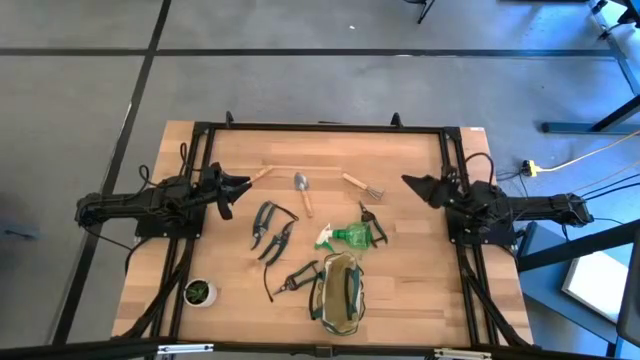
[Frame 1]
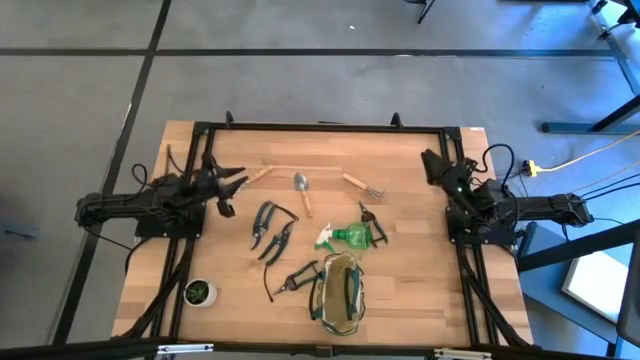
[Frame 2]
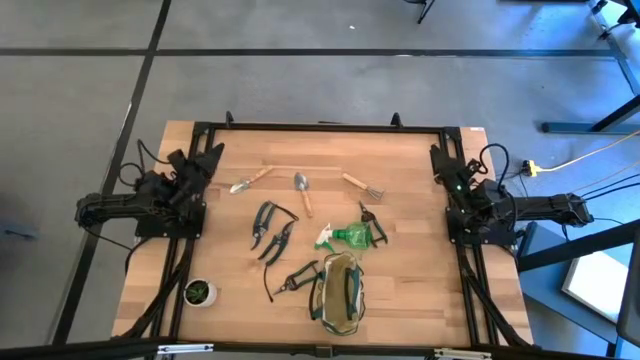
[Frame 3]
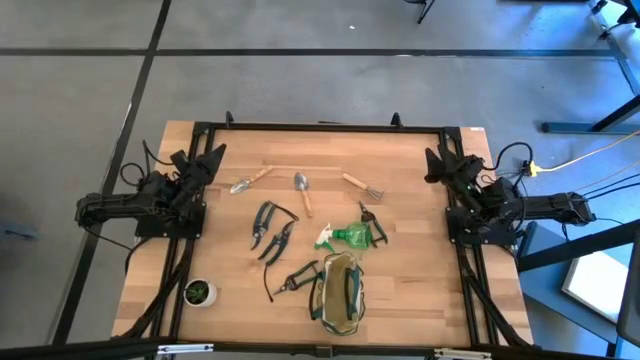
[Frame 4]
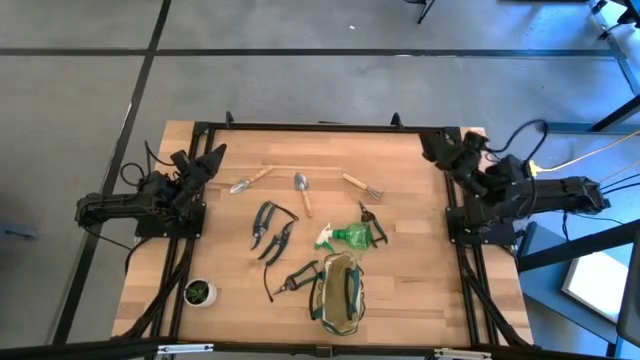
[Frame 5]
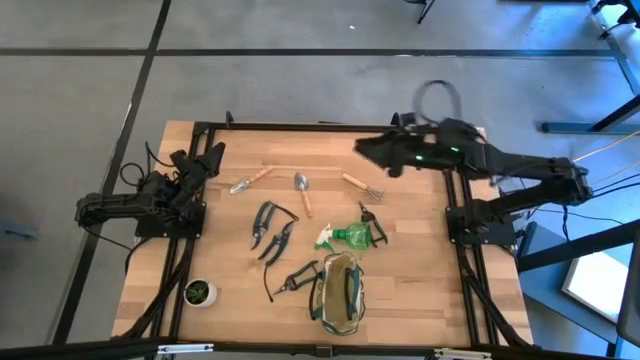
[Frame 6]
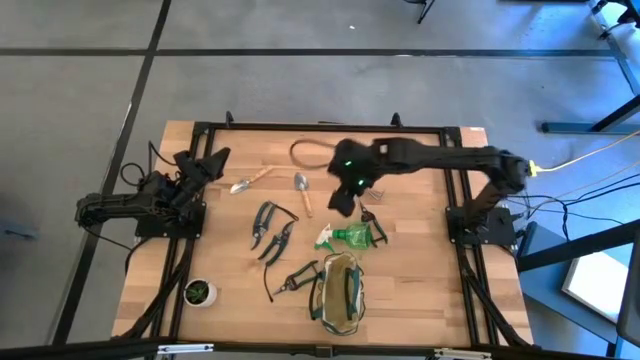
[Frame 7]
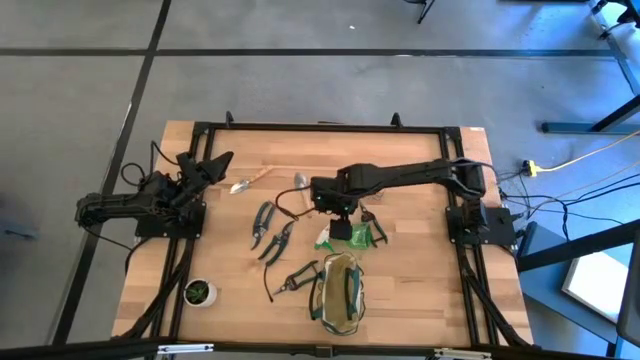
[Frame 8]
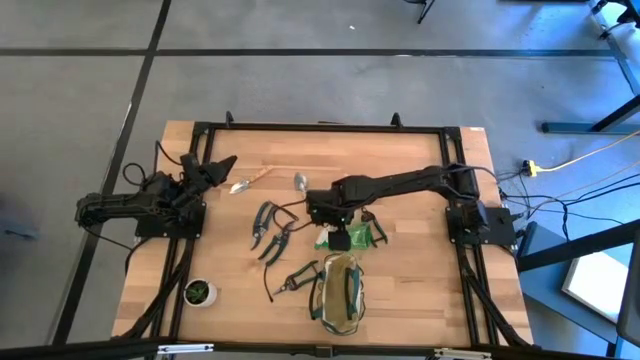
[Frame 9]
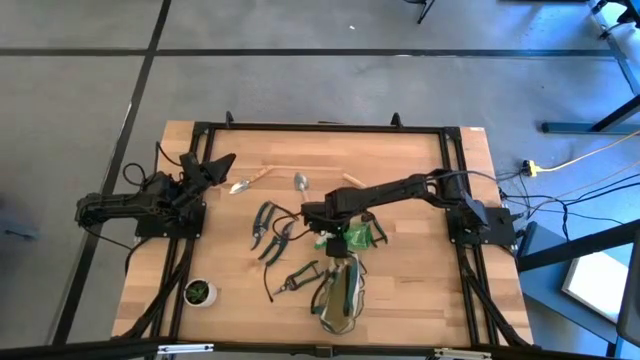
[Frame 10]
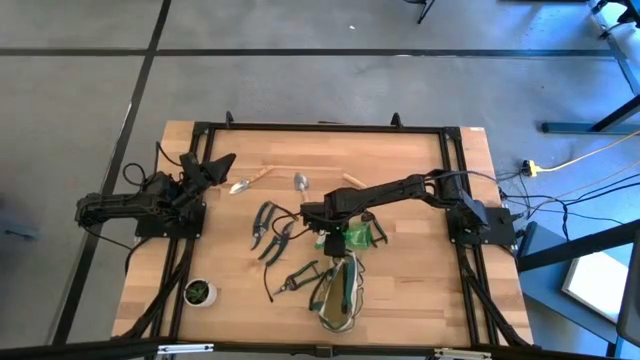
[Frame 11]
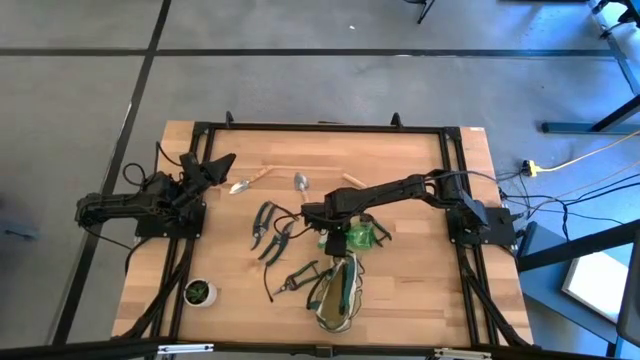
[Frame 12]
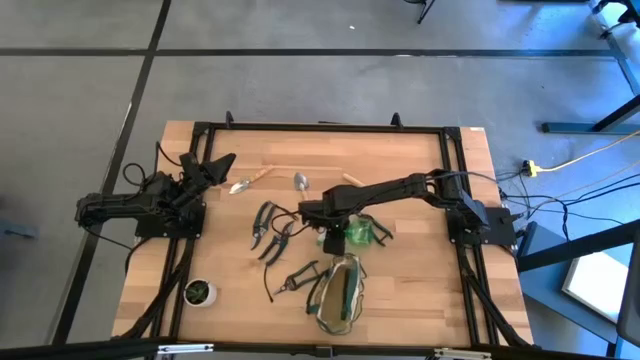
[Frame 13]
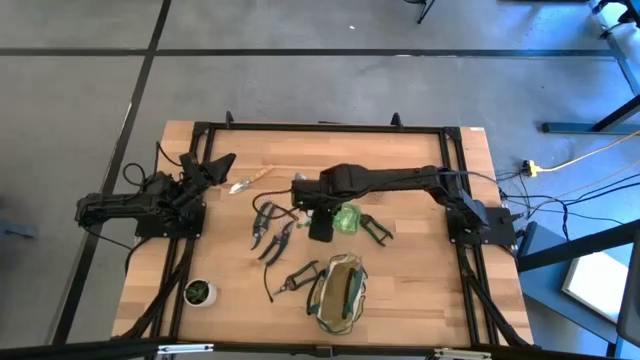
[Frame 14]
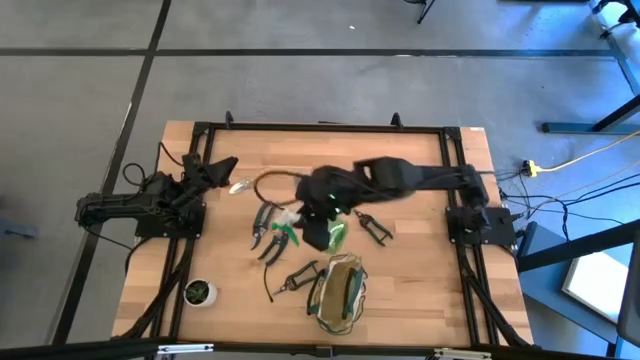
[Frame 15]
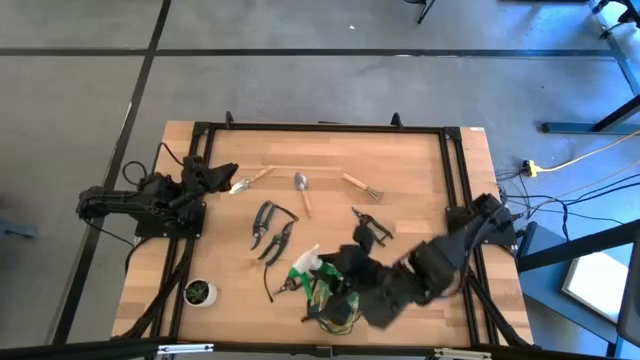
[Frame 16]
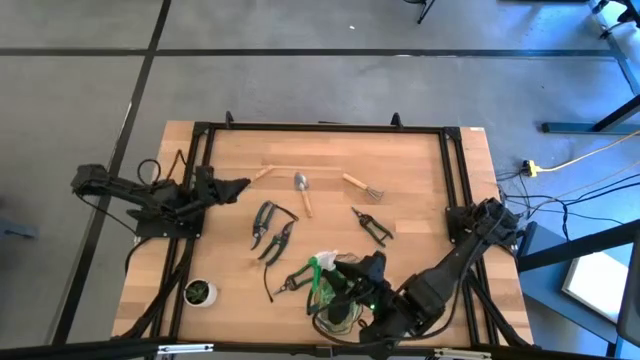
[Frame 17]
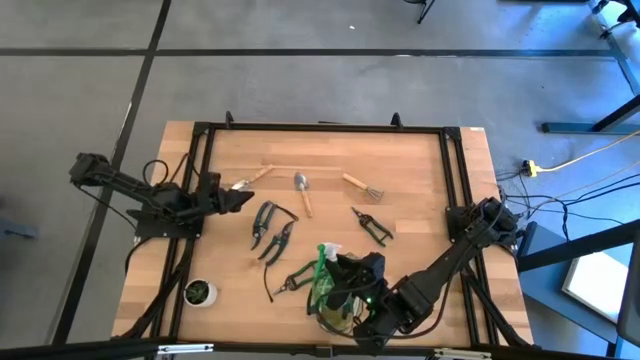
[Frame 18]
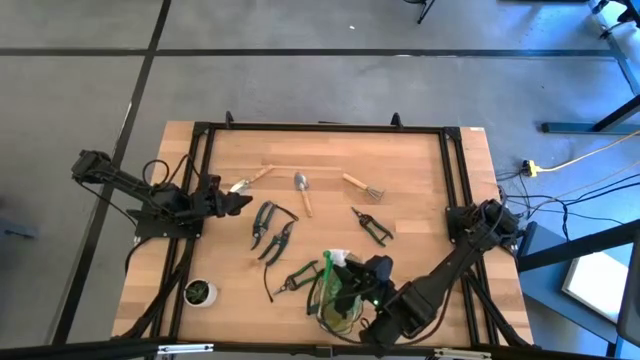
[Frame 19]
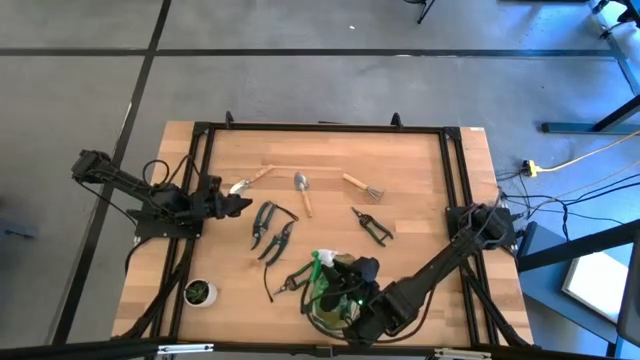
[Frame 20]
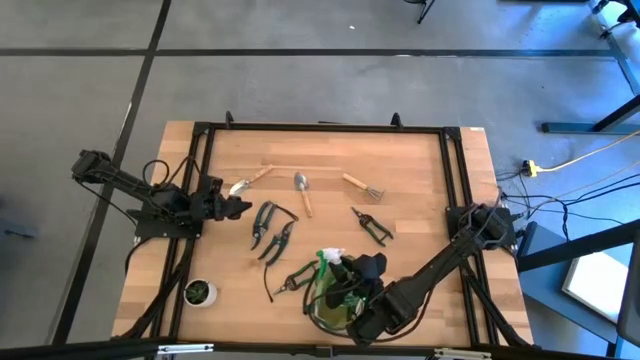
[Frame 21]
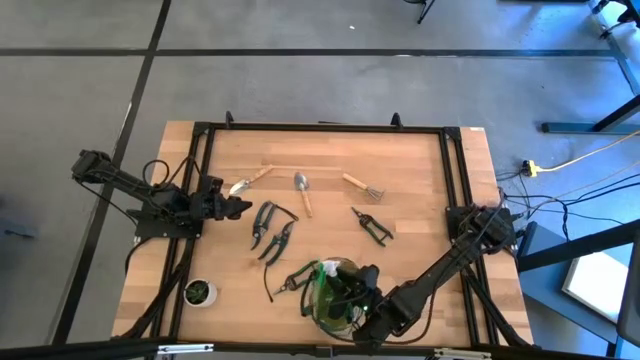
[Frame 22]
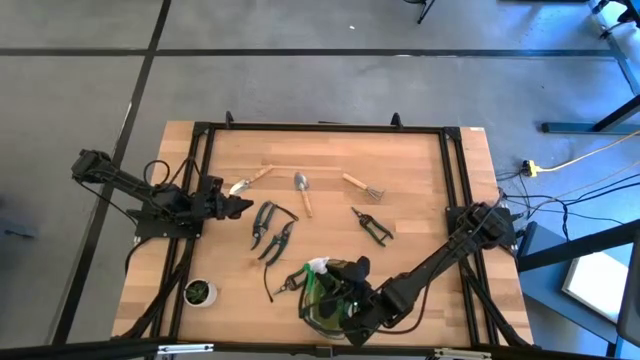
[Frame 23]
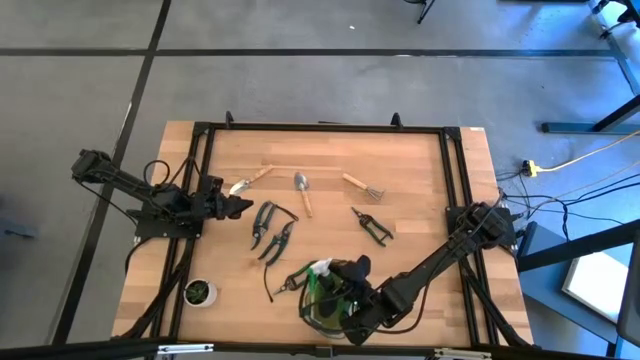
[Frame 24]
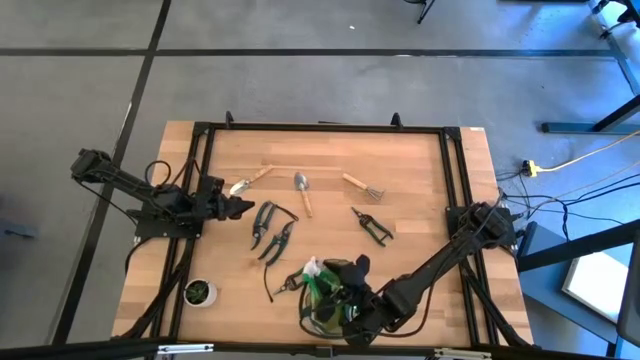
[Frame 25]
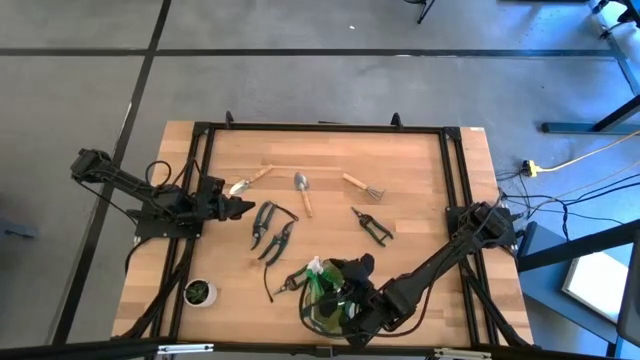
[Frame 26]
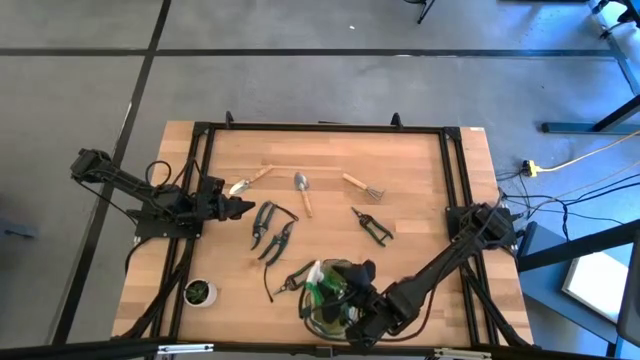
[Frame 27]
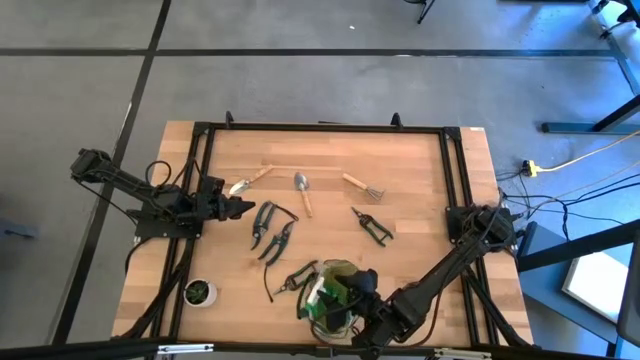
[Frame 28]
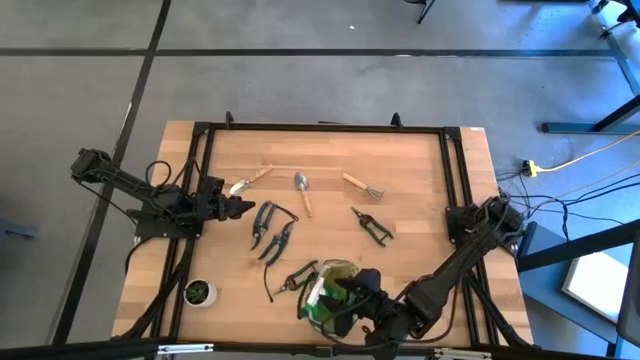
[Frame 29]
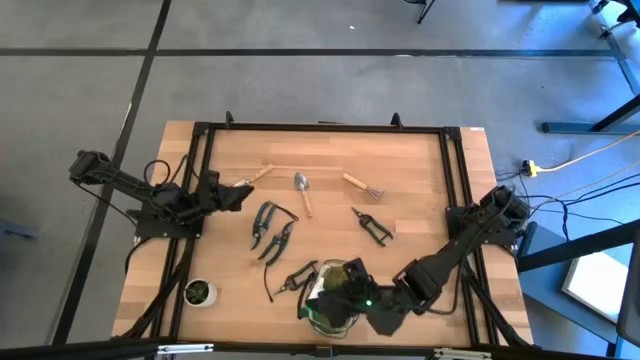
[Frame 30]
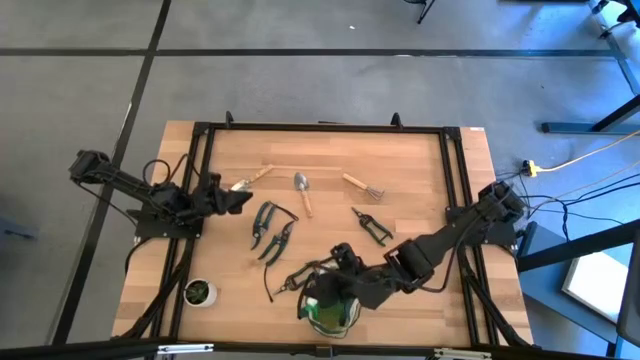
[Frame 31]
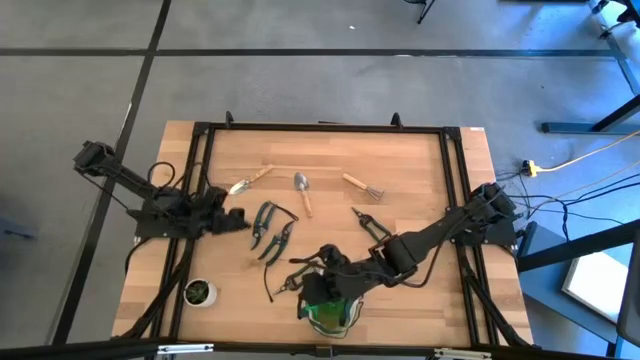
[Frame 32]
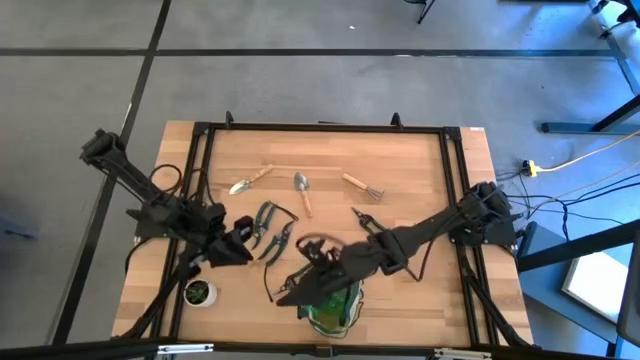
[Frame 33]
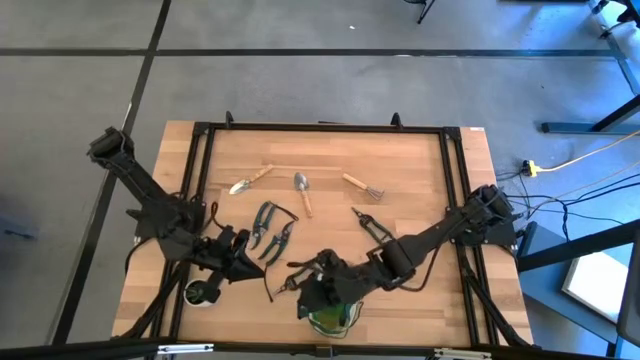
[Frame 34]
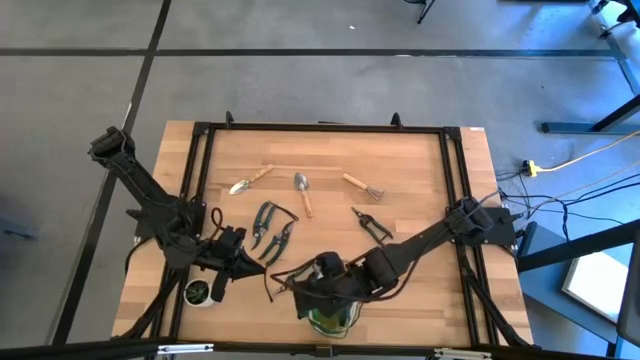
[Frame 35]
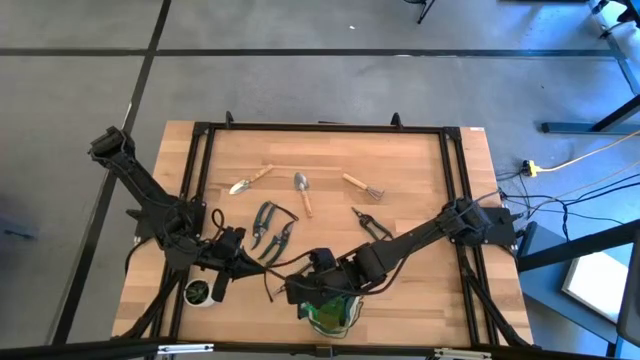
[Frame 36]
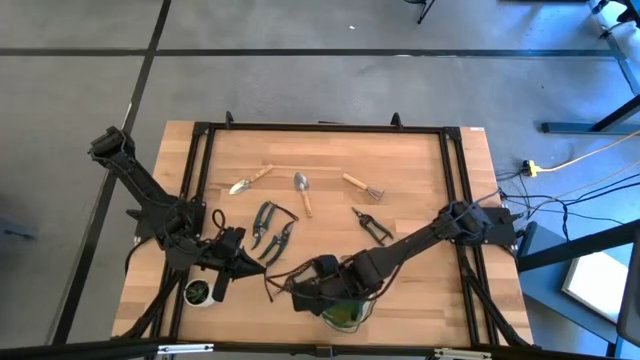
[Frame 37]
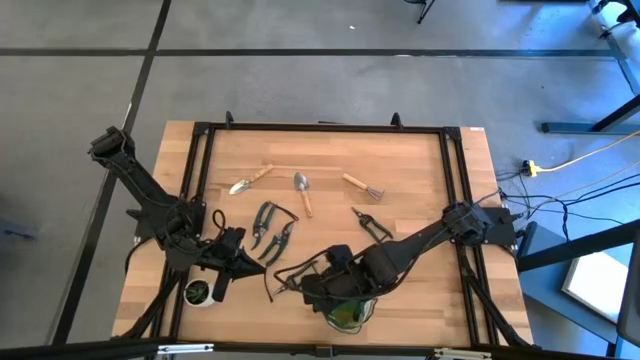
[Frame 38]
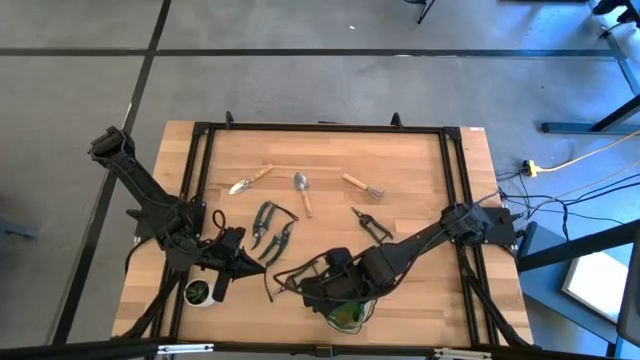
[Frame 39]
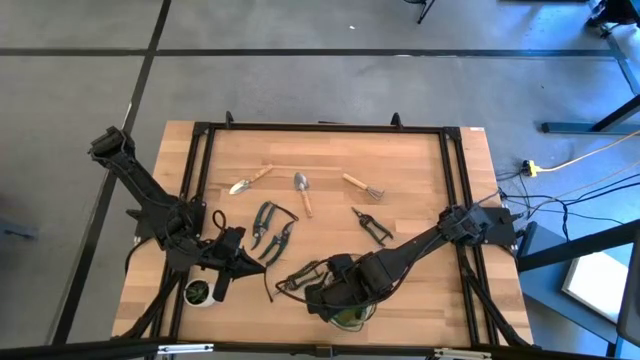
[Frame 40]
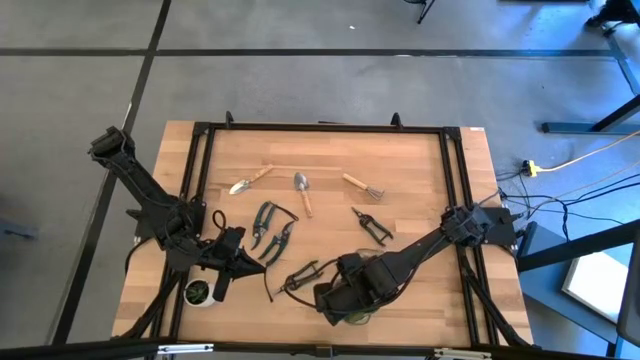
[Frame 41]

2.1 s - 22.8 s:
Task: Pick & Place Garden tools in Gardening bag
Put the left green spray bottle into the gardening bag
